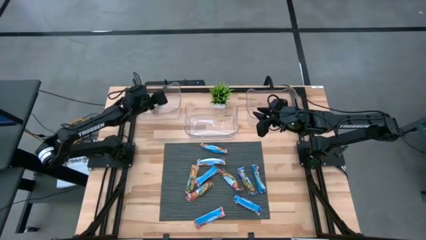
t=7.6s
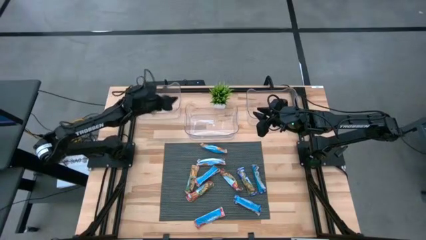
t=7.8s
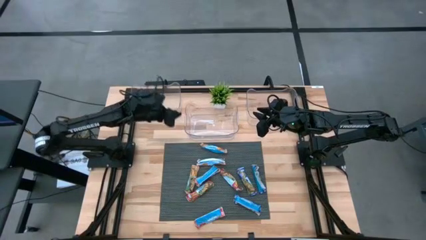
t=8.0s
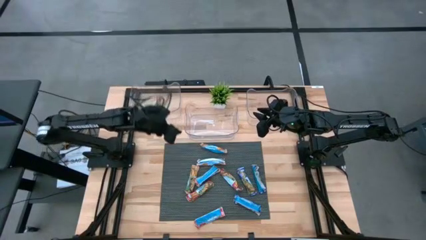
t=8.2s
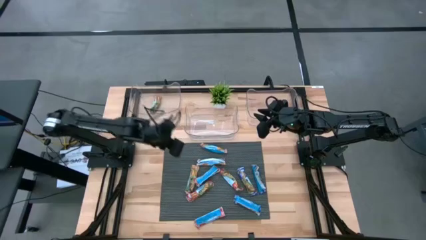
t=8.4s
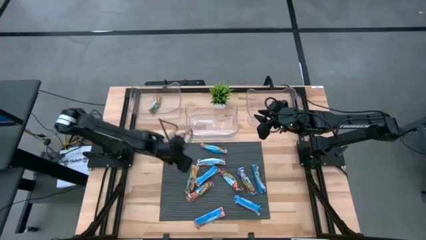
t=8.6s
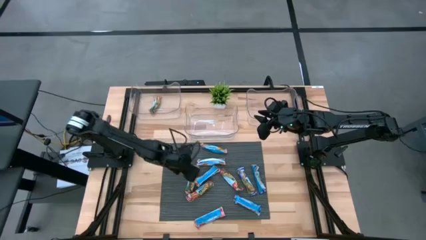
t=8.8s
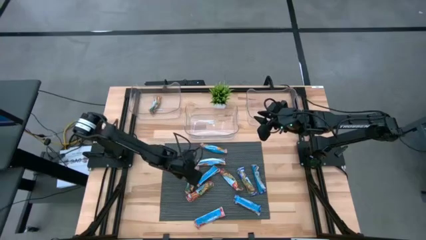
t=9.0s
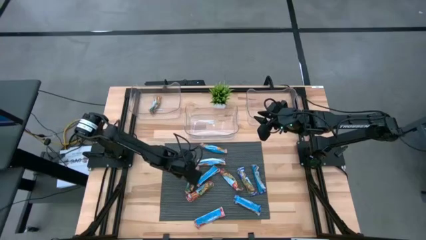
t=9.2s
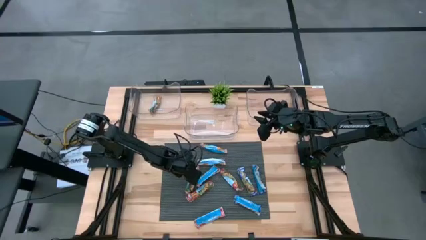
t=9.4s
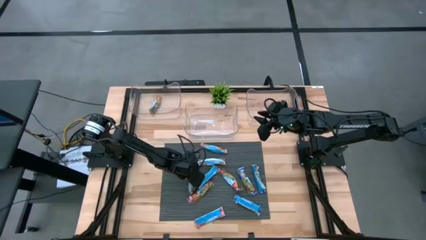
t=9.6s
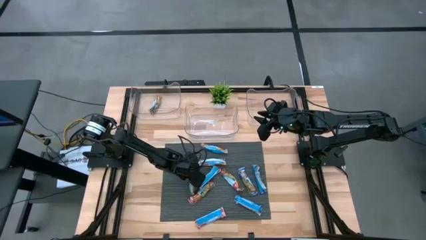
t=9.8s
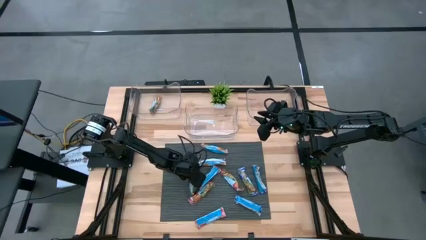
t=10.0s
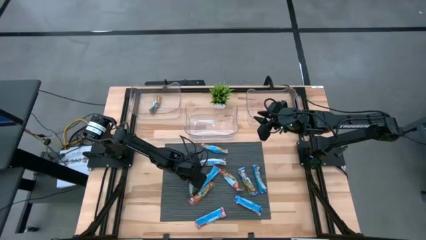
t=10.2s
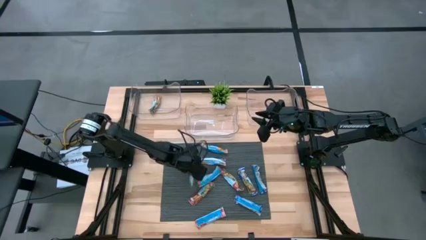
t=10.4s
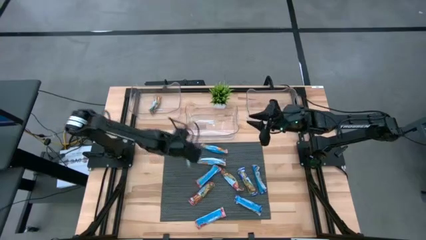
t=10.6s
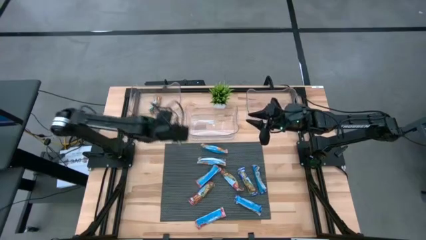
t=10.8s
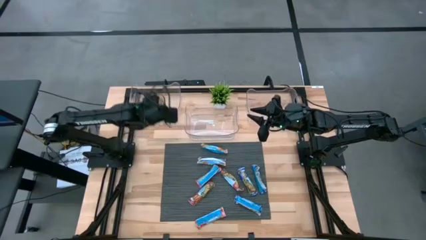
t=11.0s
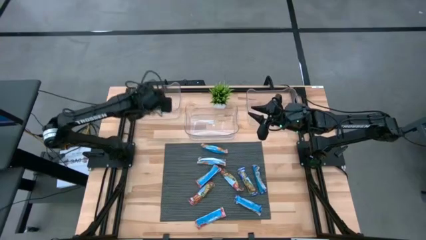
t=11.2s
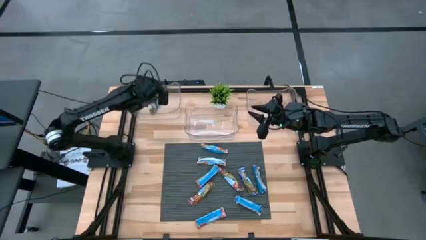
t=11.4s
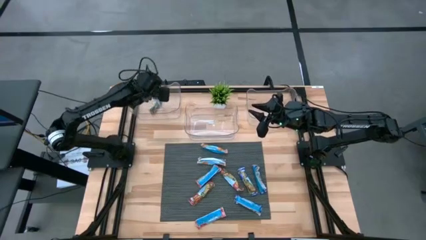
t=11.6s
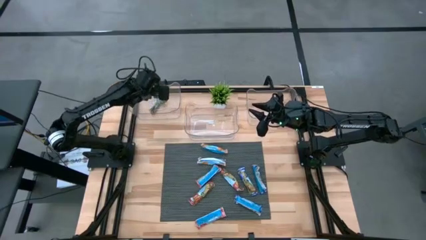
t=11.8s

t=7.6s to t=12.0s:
Task: Pick and place Granola Bars by type
Put the green granola bar into the left transparent bin

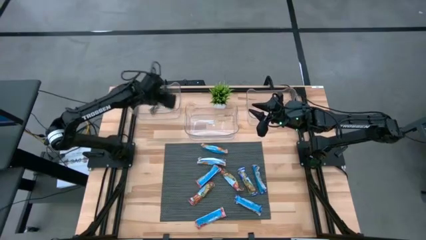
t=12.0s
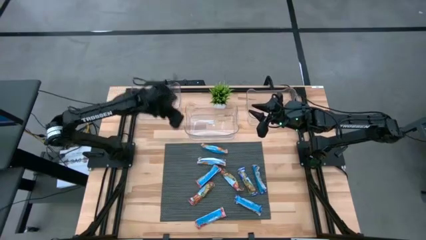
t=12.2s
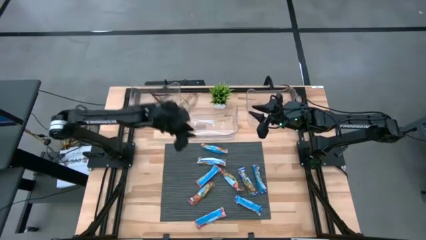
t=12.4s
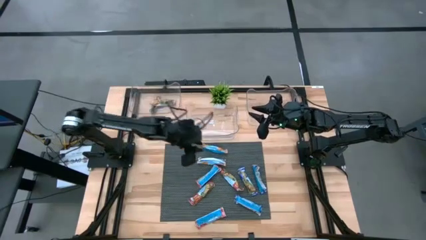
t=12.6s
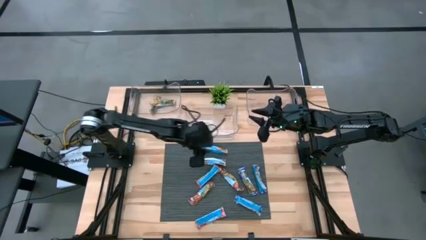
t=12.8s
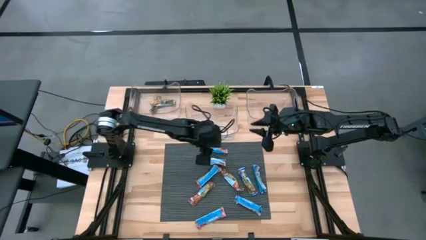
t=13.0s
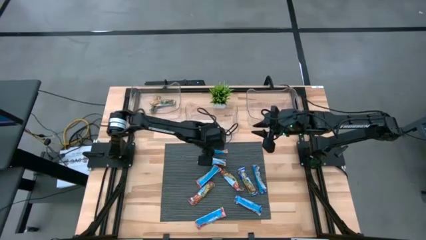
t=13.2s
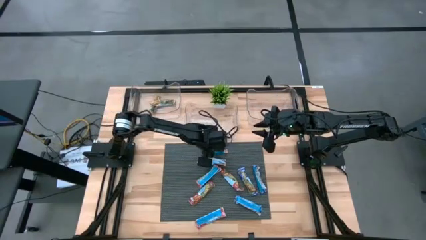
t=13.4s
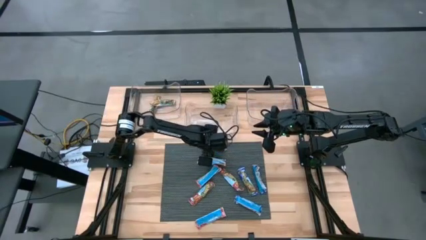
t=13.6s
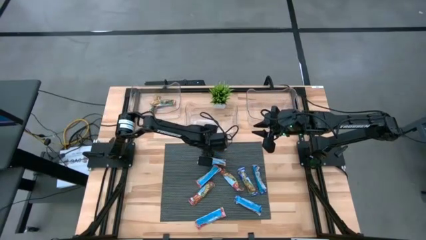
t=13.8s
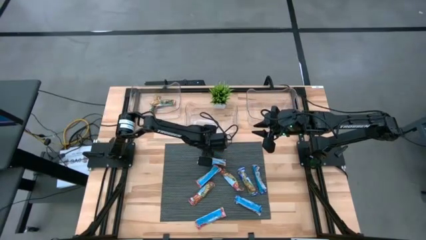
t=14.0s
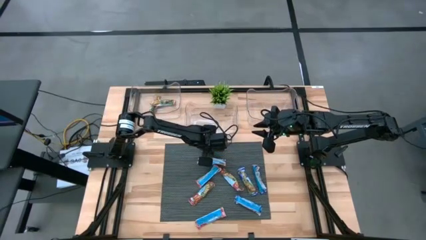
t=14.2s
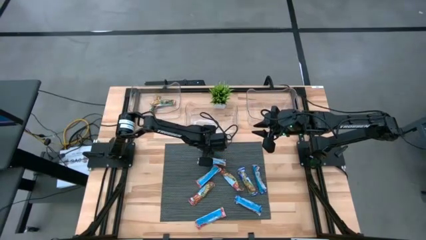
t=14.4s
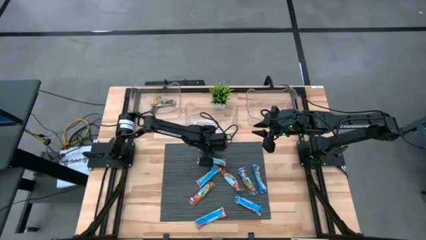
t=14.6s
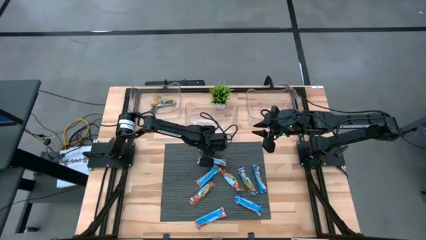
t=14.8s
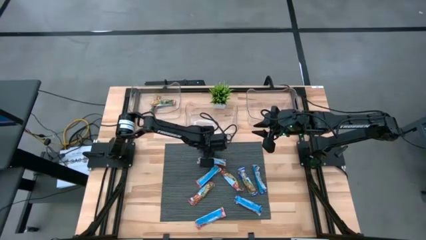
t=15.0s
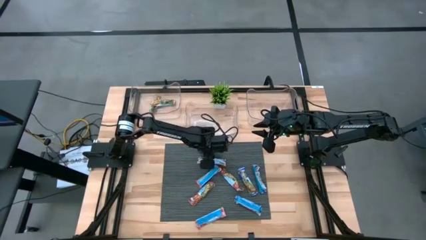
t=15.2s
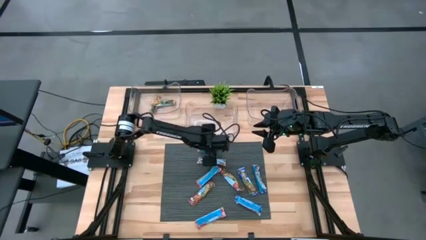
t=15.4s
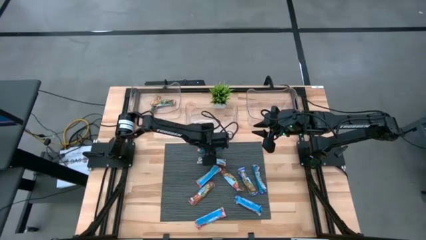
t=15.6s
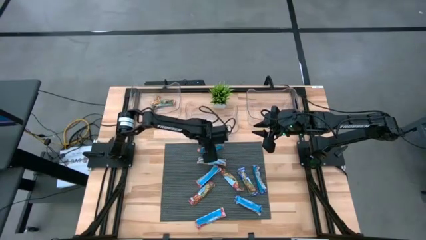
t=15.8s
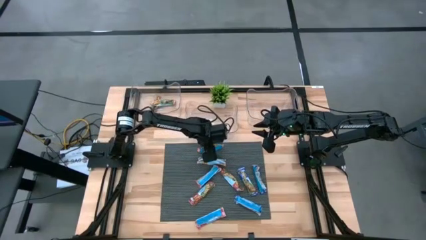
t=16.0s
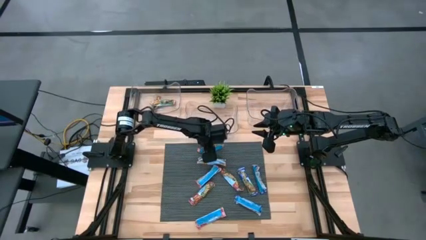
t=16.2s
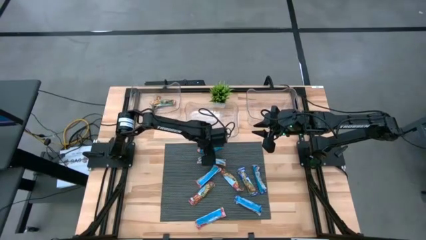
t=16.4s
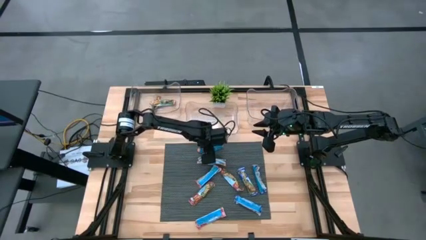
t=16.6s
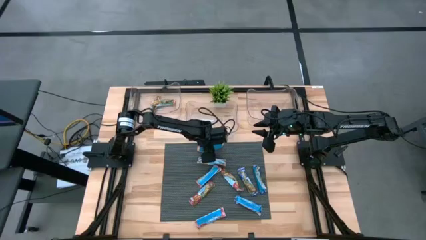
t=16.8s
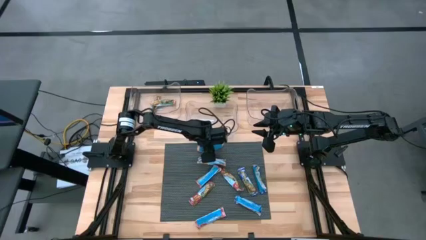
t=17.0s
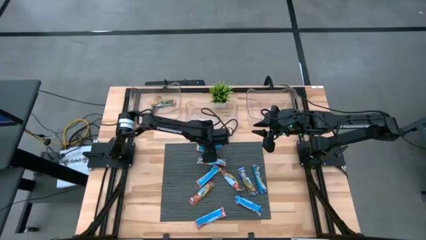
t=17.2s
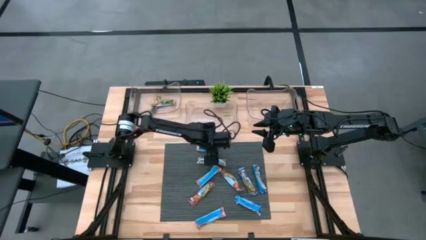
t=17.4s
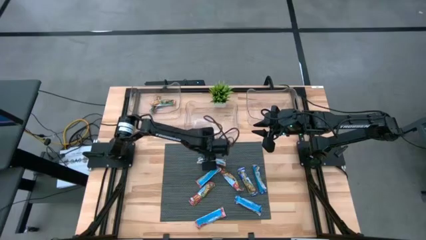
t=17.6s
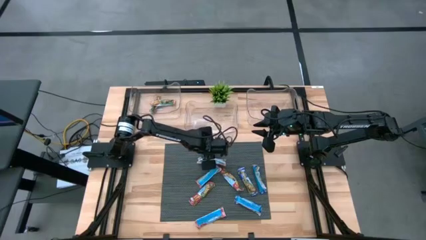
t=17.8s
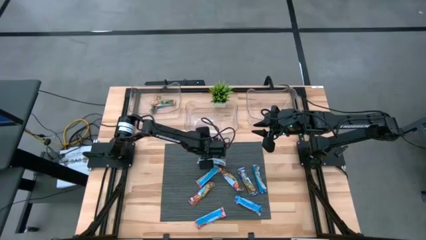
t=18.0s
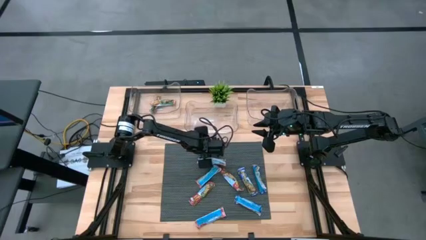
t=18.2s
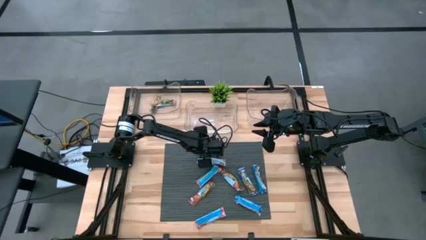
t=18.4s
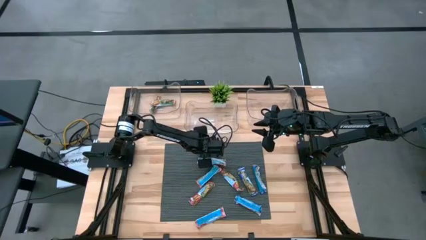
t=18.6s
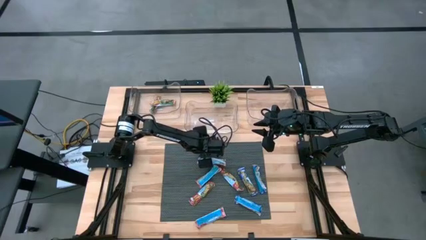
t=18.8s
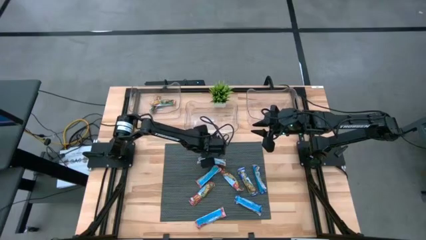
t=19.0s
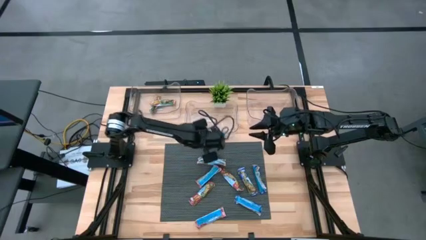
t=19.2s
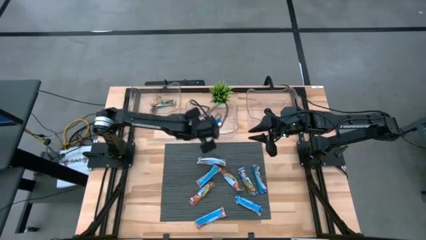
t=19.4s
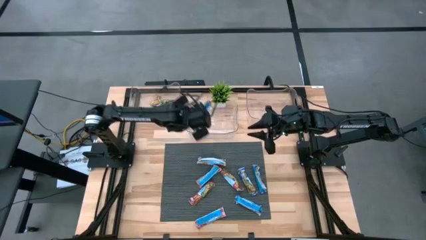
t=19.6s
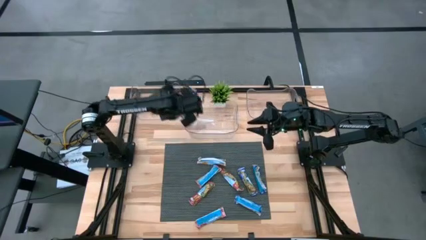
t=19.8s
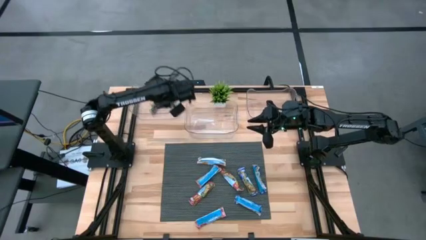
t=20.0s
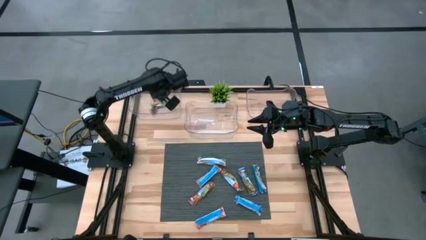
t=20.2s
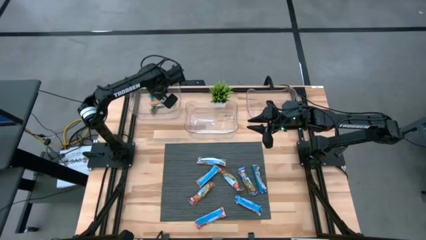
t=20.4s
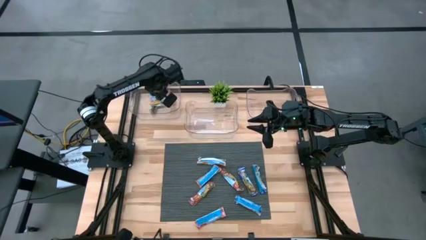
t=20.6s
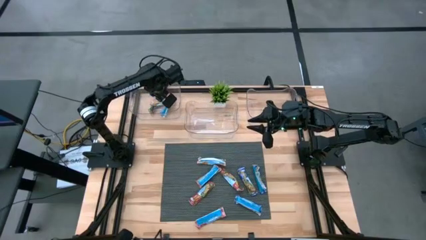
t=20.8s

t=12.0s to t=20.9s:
Put the blue granola bar into the left transparent bin

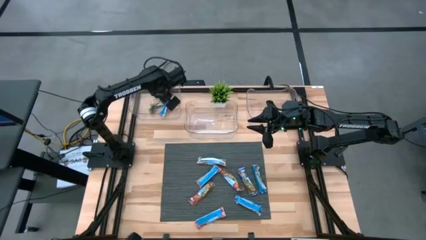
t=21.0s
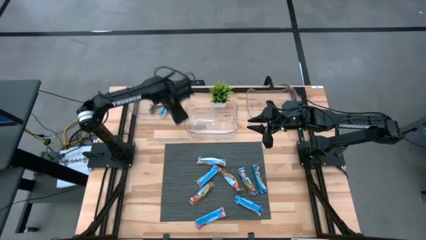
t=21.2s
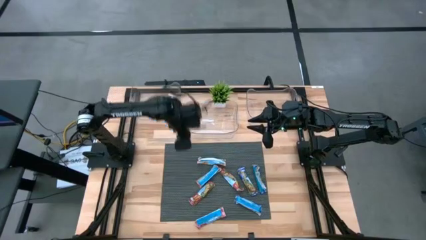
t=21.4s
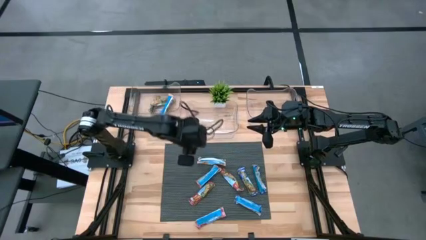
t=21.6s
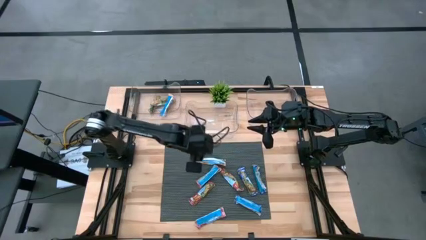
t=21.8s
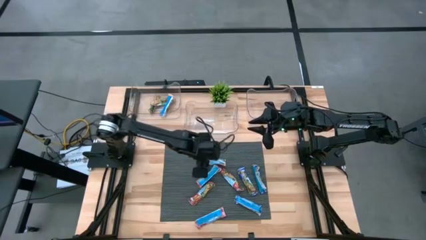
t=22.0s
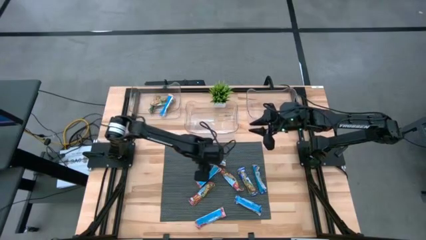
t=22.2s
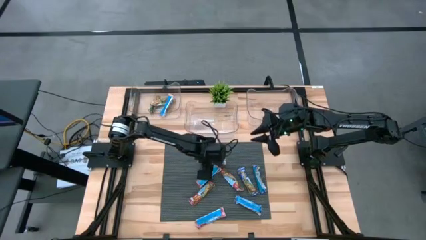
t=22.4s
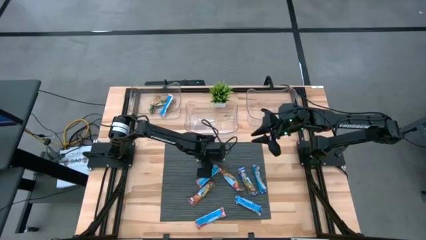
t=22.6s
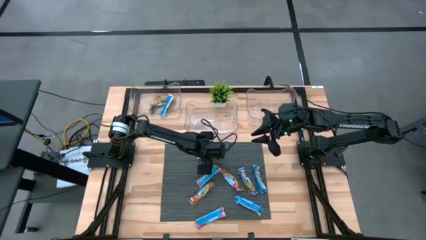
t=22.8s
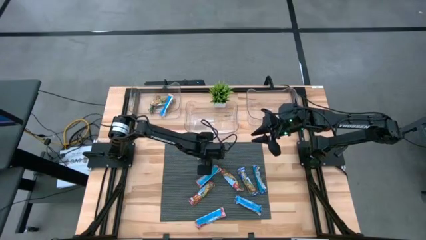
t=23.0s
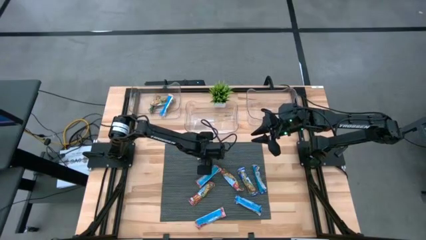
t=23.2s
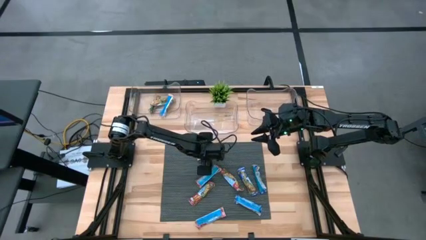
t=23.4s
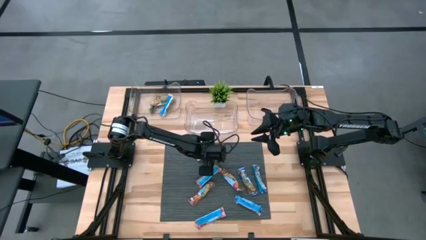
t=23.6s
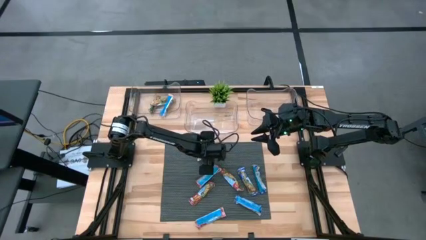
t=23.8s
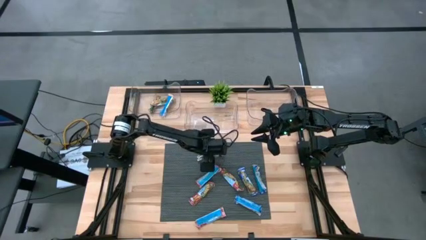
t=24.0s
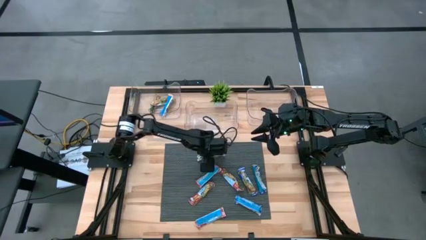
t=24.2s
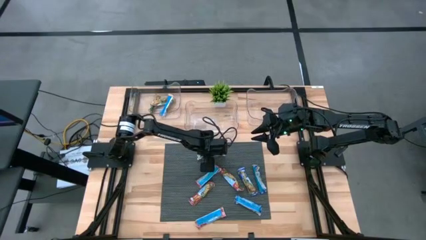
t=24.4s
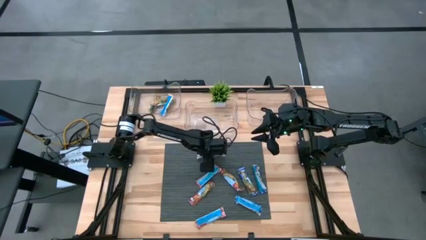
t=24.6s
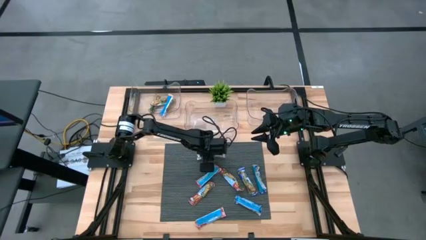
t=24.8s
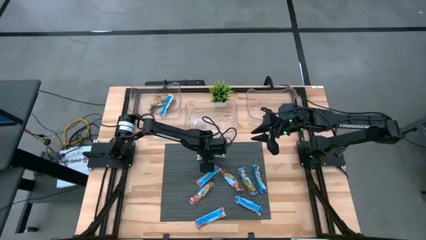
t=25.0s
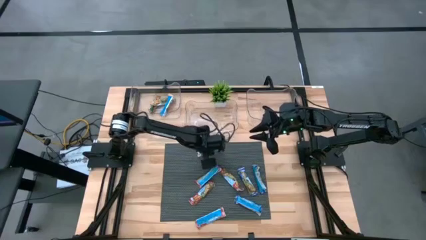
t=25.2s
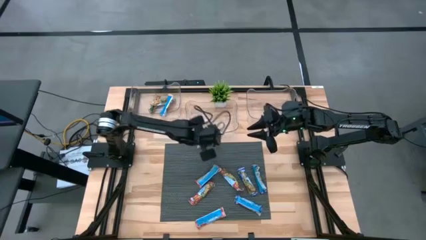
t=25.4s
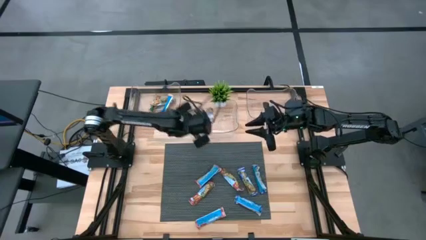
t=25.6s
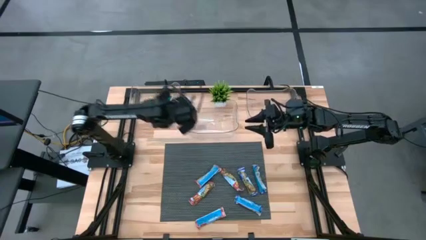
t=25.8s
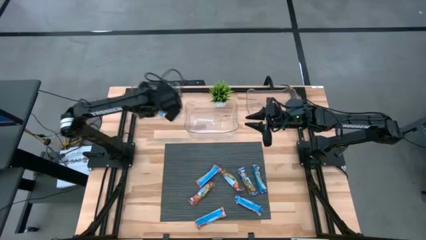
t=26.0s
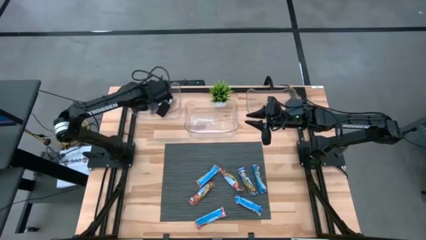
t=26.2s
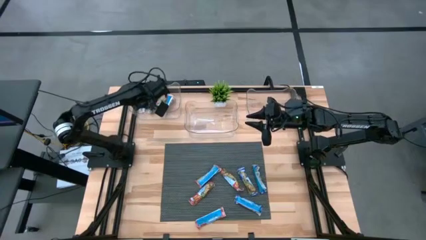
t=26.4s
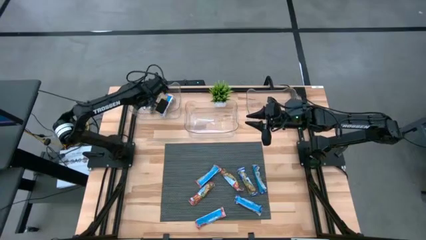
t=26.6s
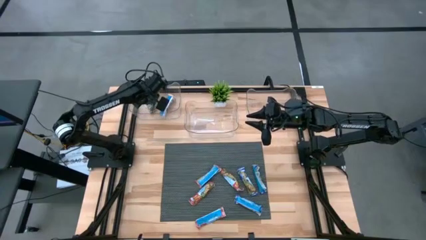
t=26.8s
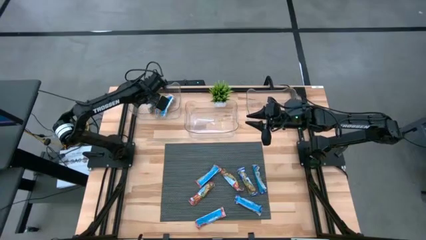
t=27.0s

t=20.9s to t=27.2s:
Put the blue granola bar into the left transparent bin
